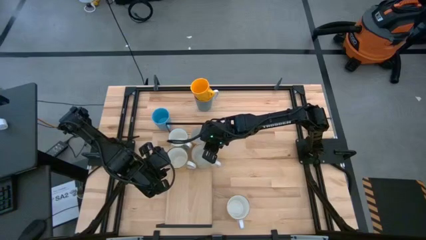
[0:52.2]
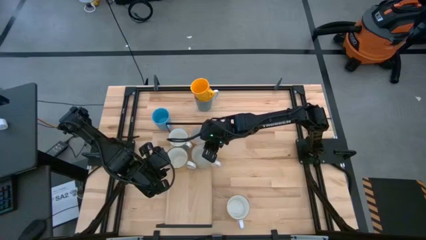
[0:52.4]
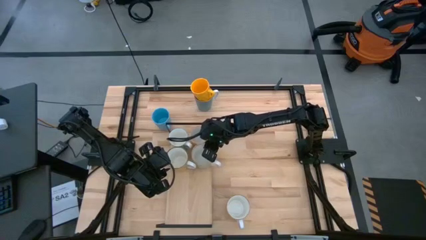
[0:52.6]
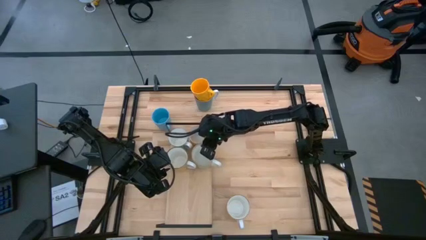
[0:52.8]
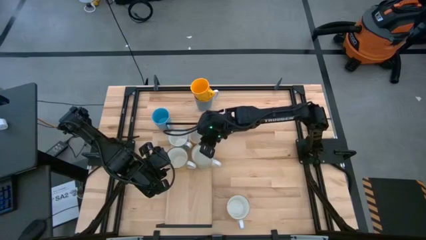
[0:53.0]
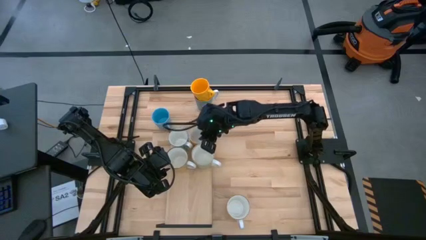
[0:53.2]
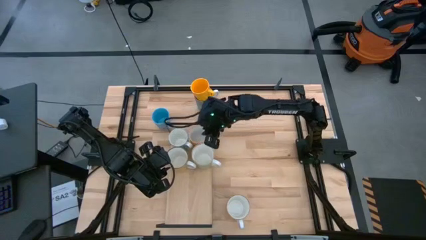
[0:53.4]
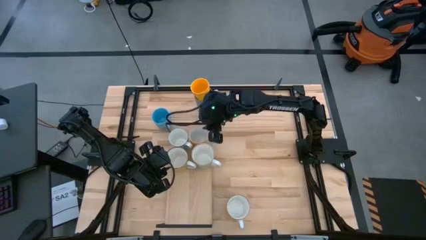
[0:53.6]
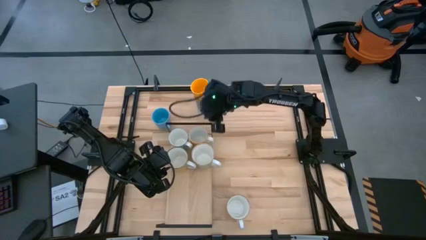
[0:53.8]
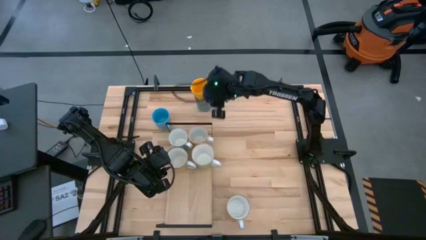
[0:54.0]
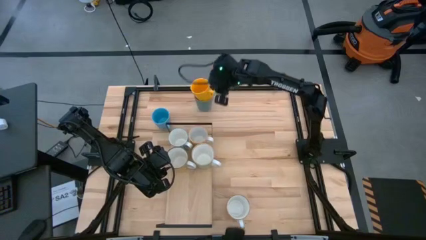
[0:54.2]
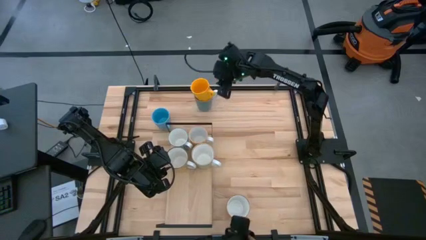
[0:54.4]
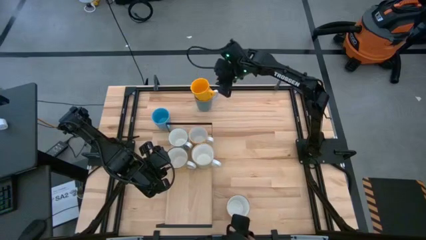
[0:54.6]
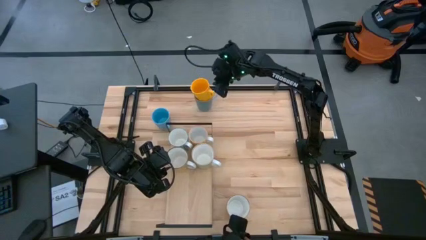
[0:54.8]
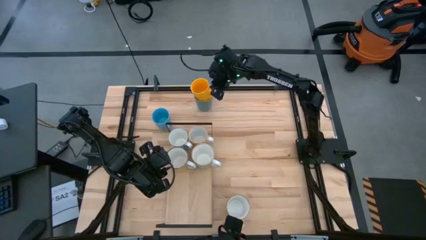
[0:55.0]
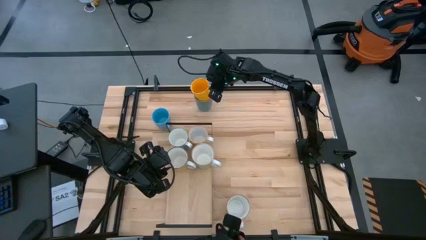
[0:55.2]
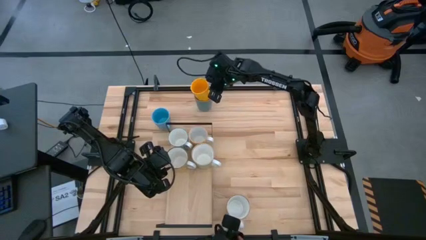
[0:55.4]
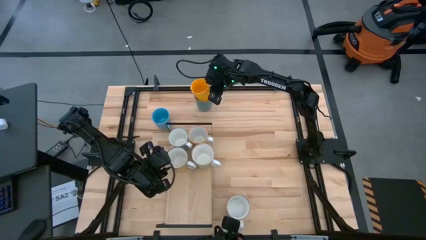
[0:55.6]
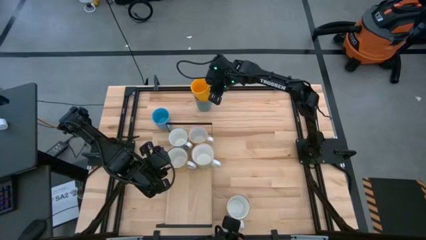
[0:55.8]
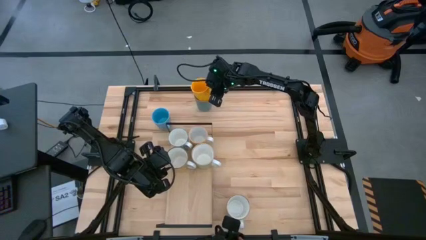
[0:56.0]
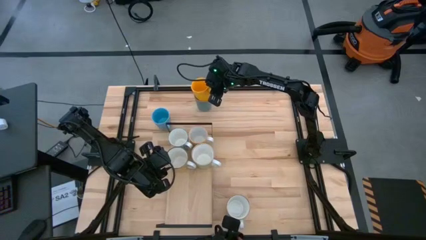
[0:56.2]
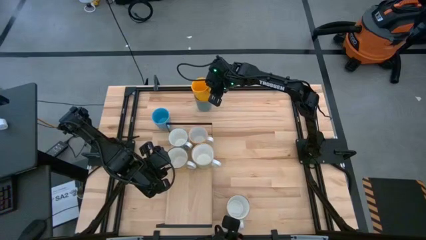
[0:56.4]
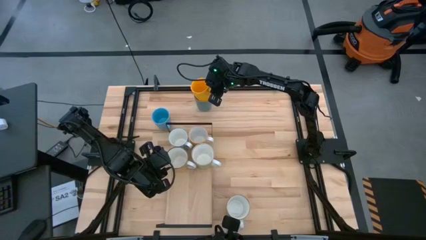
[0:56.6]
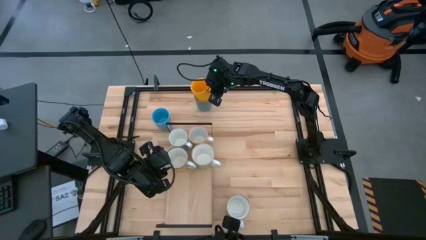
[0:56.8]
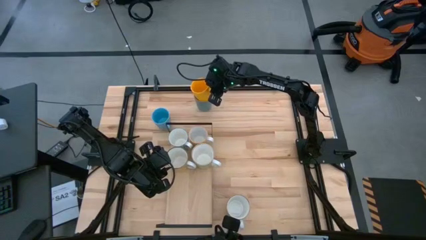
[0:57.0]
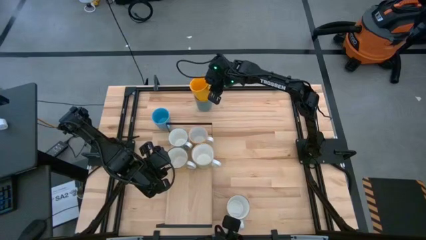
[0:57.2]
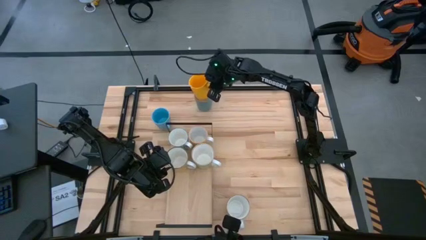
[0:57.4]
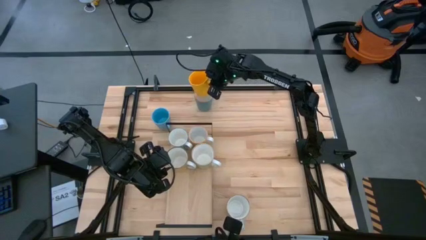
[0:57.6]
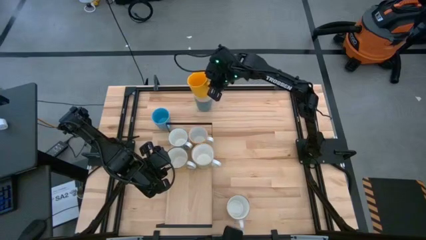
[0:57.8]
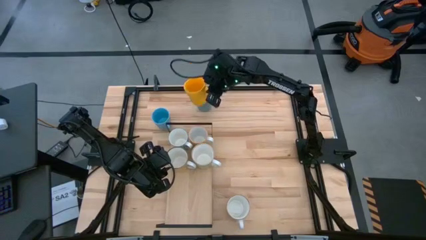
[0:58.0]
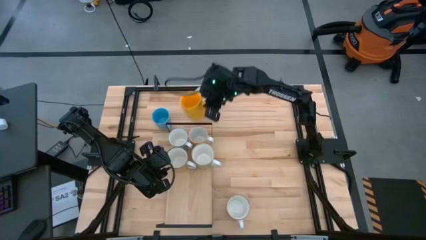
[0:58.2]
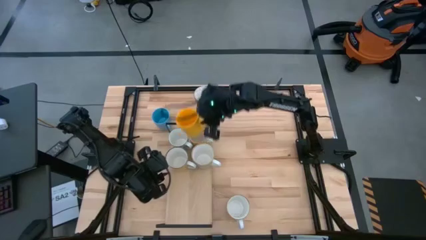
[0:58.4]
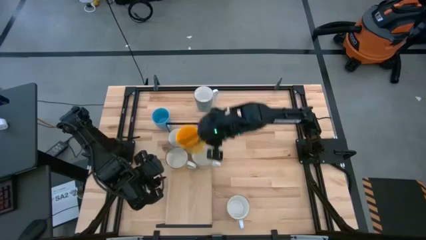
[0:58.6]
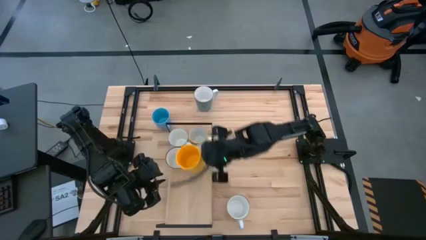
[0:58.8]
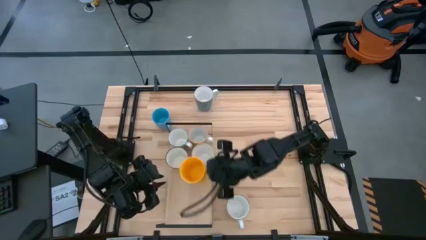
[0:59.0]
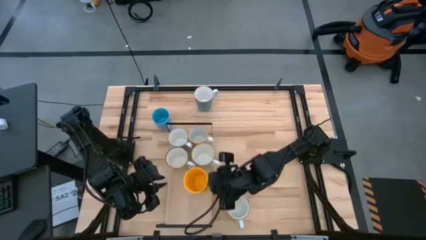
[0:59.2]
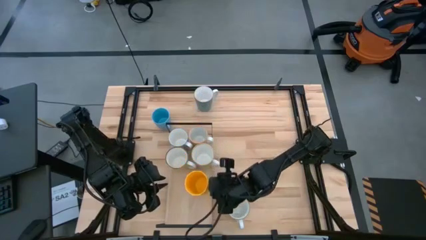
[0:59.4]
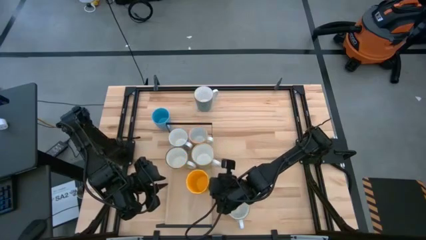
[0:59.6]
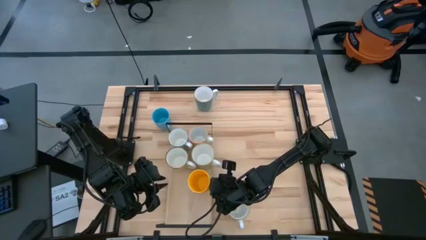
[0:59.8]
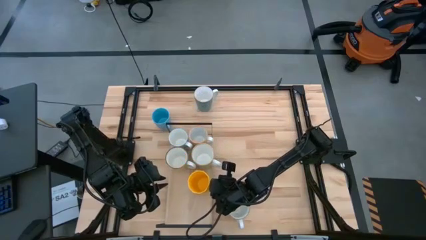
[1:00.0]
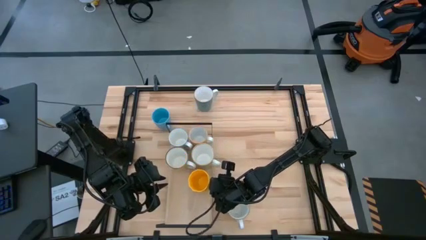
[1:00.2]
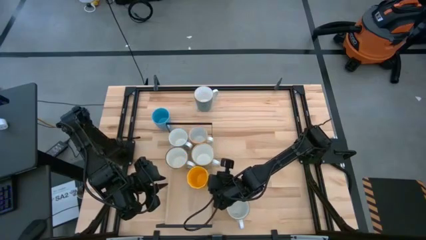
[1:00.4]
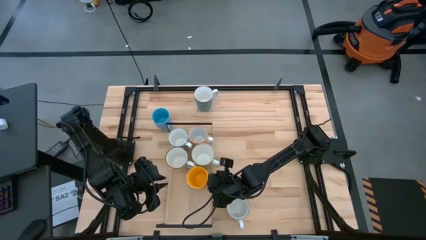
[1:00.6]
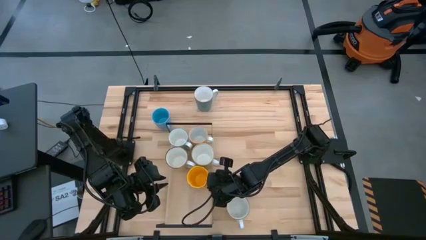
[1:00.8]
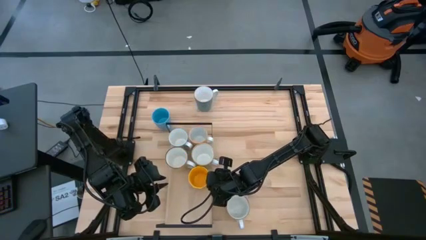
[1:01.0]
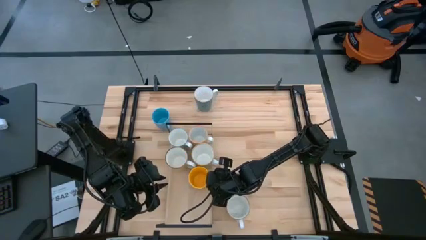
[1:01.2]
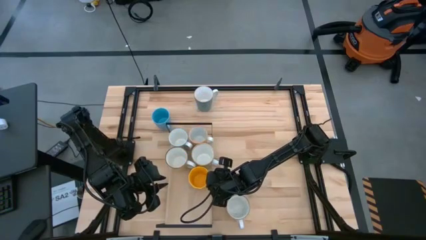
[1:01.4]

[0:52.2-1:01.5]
Task: Place coffee mugs
Put the yellow mug on the shelf

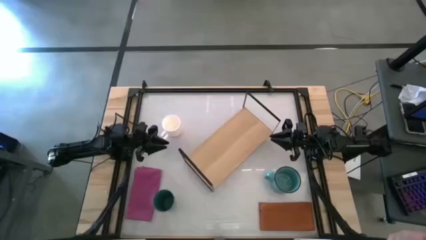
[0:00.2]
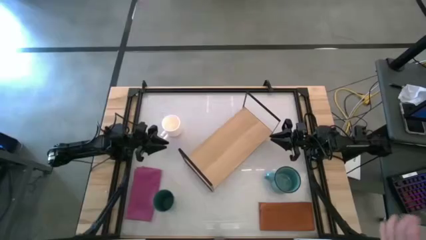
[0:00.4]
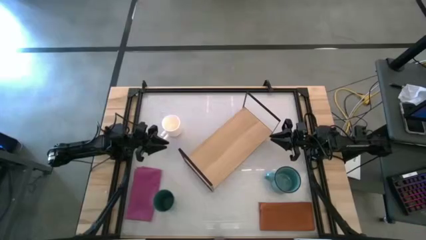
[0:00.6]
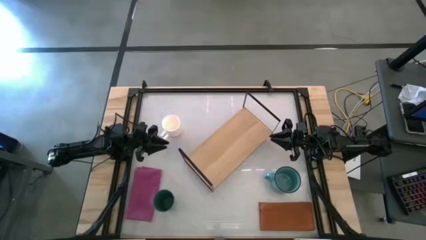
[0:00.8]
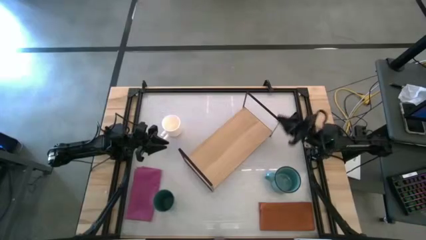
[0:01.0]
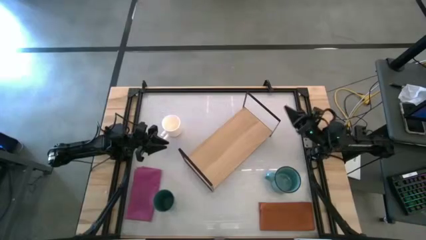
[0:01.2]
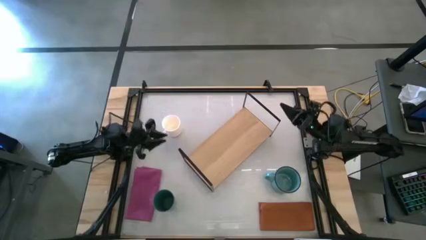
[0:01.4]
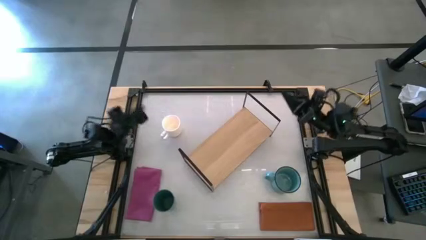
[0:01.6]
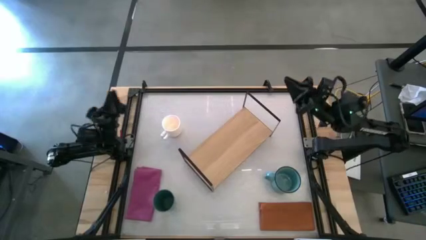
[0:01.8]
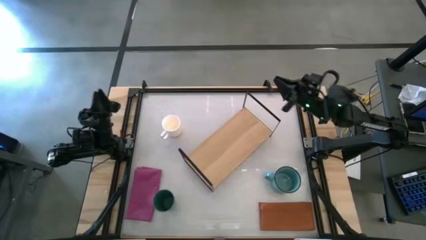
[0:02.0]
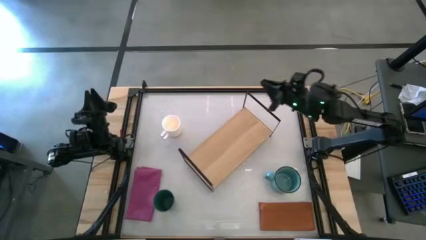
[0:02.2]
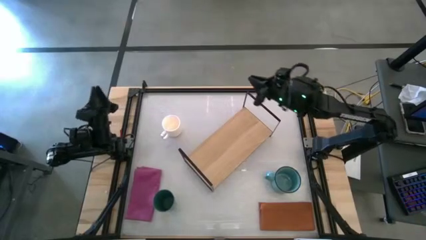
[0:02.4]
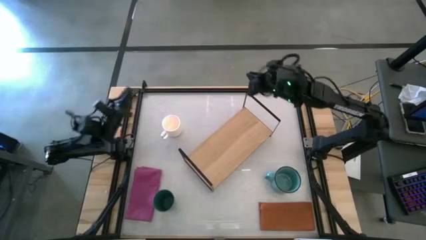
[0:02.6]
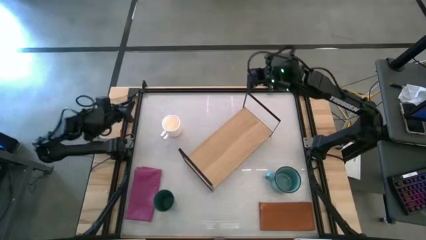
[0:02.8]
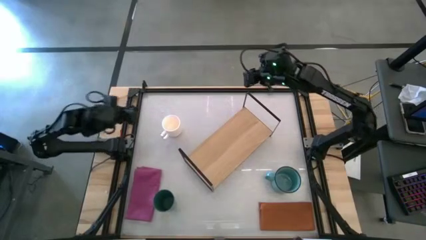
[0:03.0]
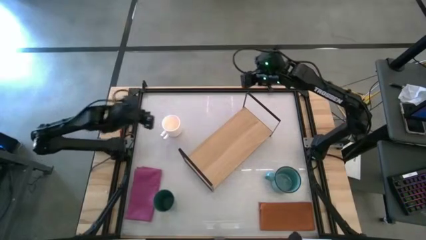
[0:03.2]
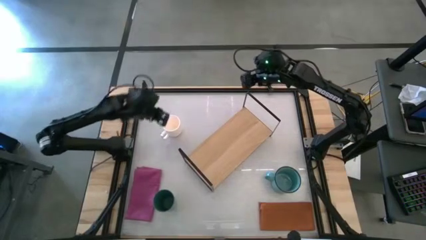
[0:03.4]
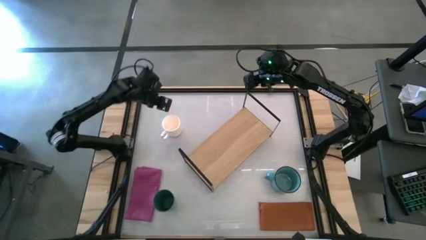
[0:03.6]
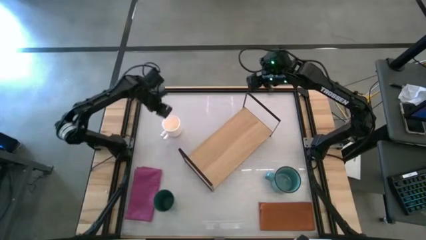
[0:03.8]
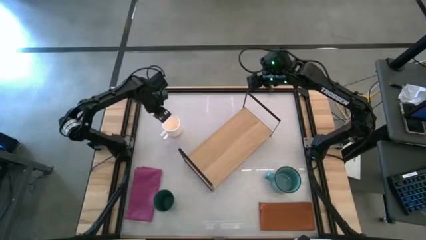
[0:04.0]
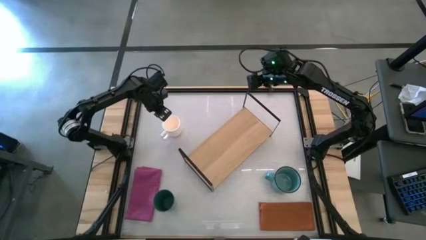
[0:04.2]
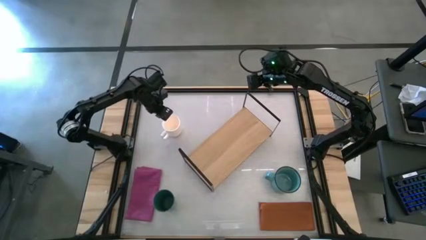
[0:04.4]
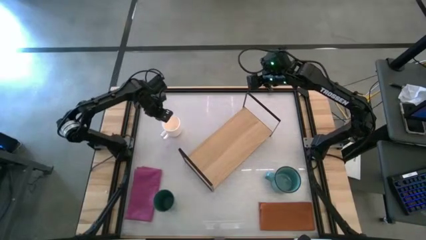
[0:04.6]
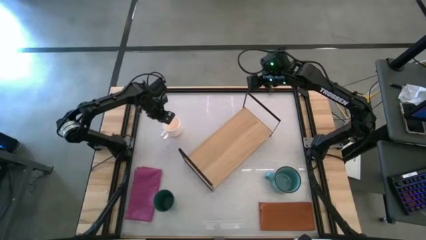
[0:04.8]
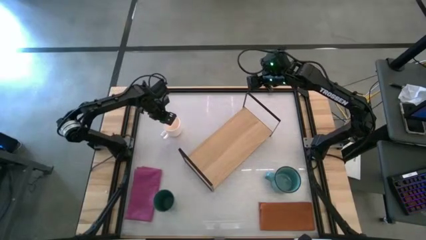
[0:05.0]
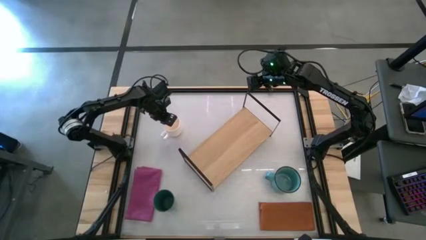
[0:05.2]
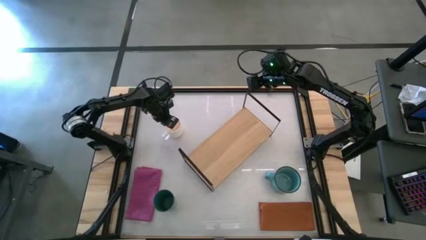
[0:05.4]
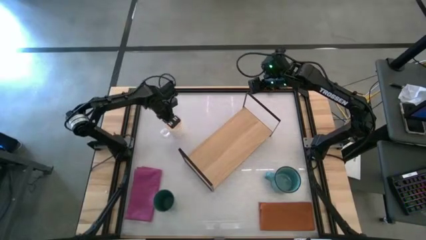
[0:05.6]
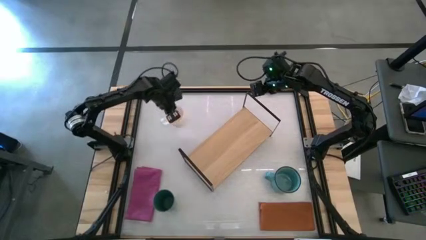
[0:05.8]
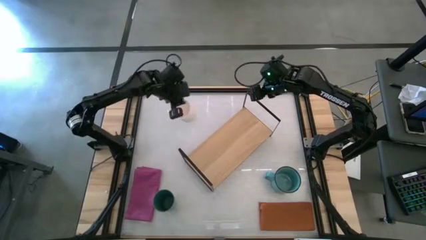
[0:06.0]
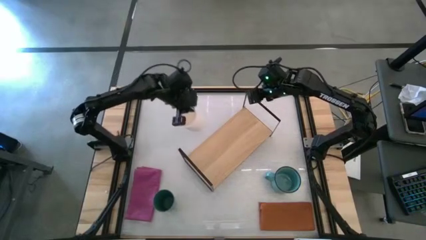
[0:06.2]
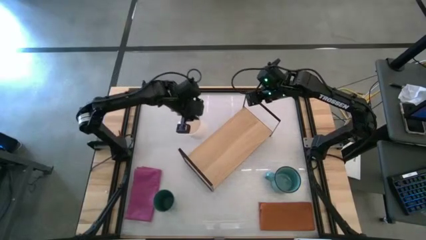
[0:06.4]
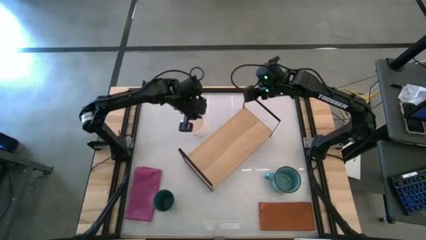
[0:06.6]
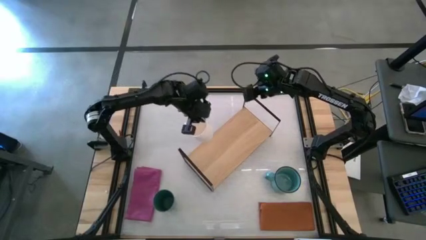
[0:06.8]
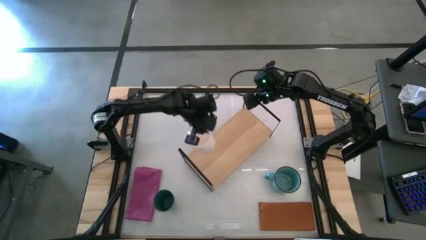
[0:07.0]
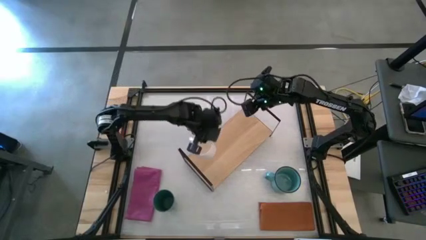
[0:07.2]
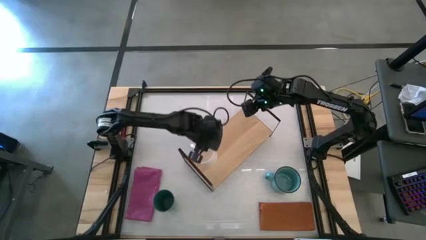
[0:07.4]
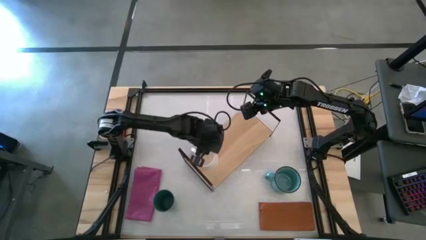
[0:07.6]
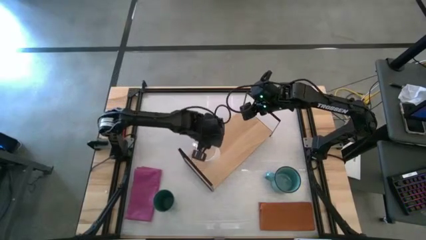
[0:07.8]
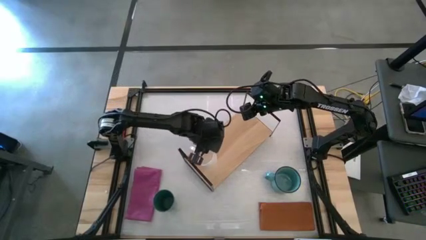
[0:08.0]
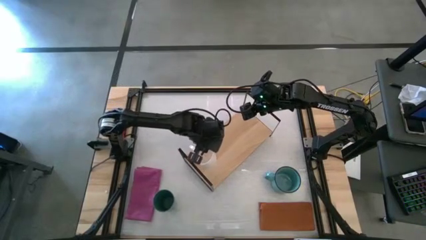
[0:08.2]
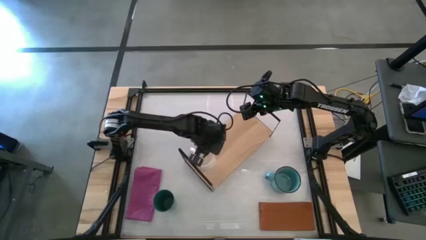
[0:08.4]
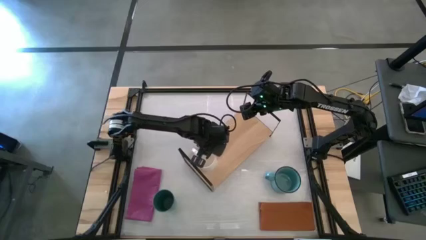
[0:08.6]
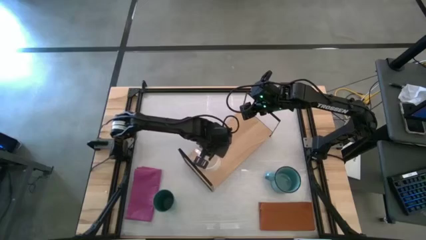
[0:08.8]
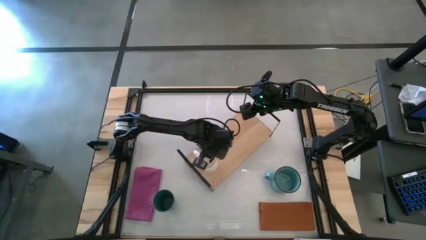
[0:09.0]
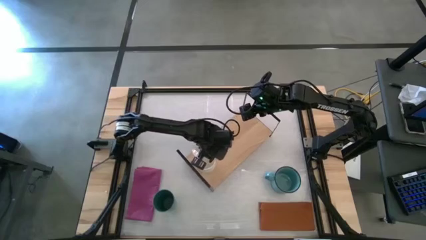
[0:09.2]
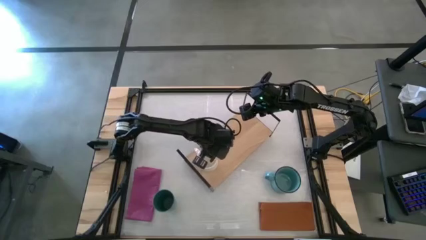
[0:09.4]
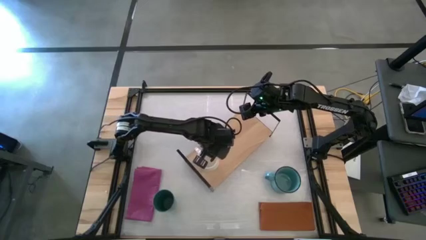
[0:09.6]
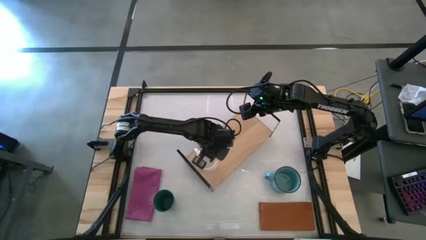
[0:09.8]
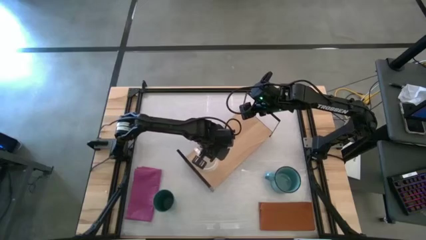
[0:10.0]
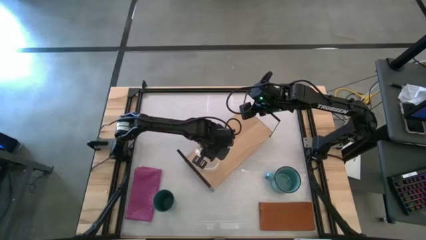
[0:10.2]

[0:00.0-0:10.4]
Task: Stack small to large cups/mugs on shelf
Put the white mug on the shelf
